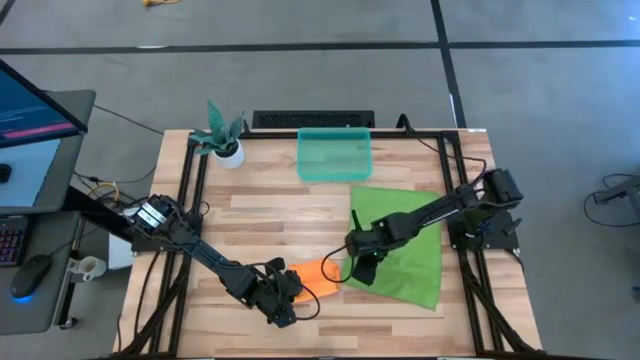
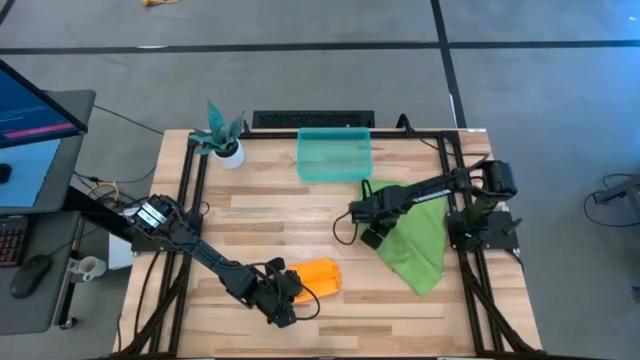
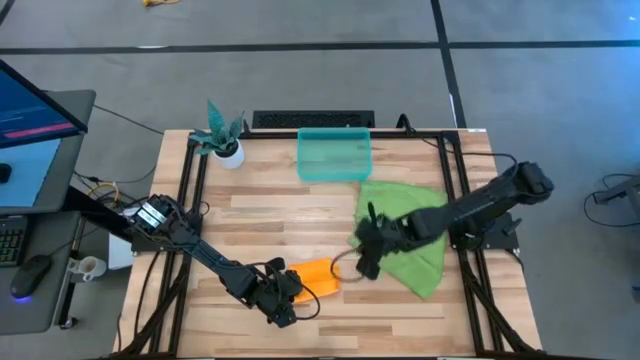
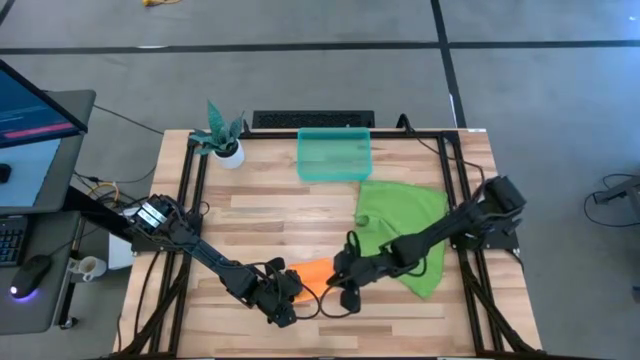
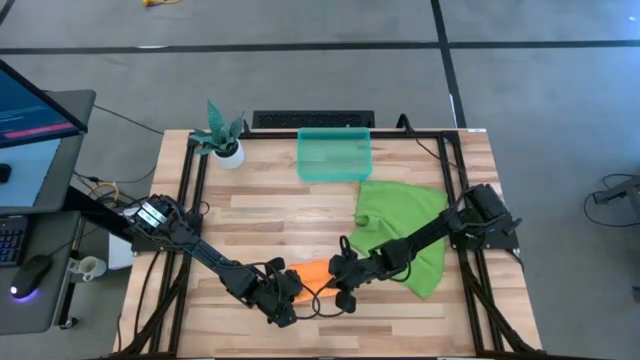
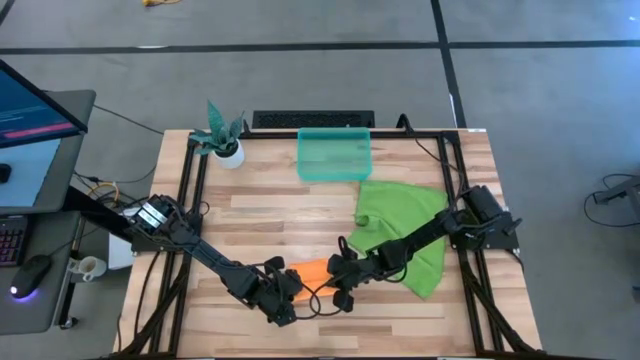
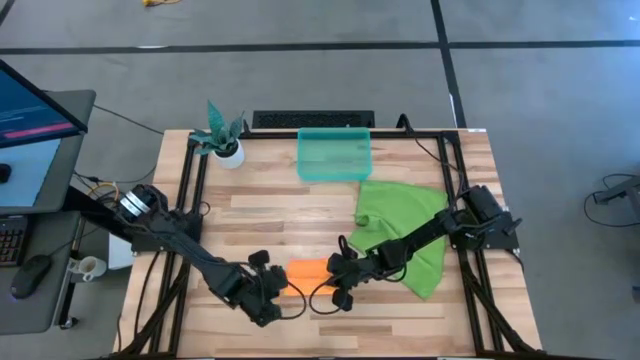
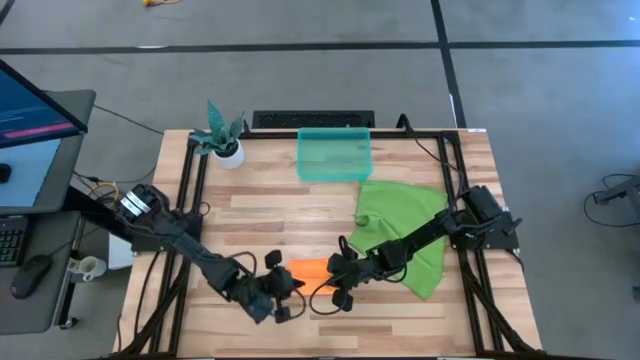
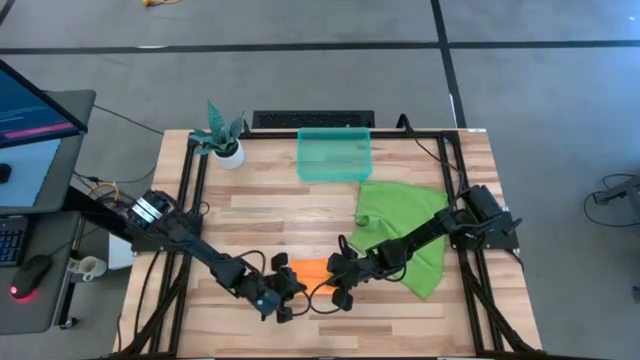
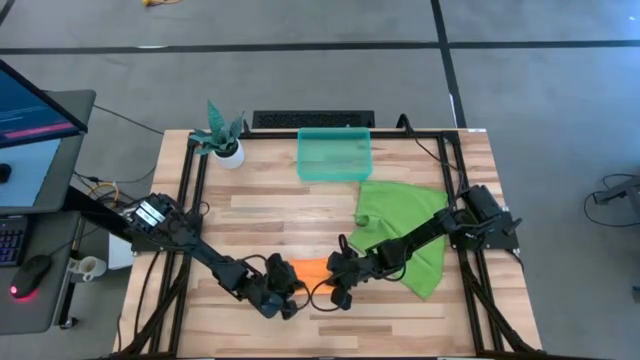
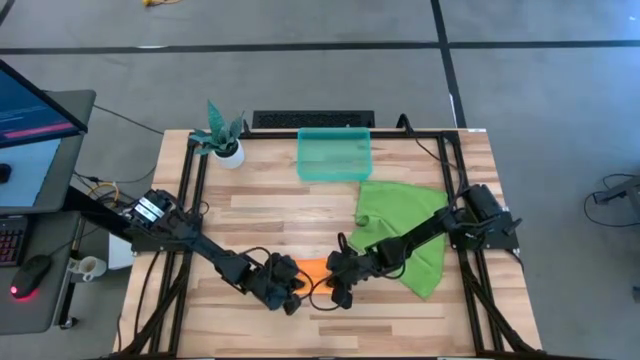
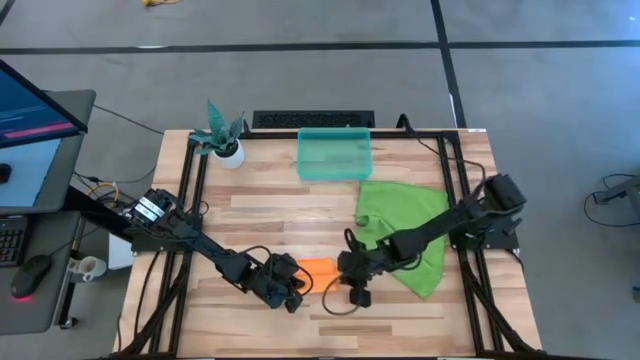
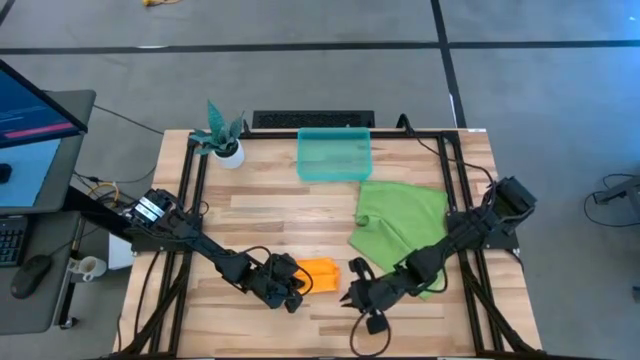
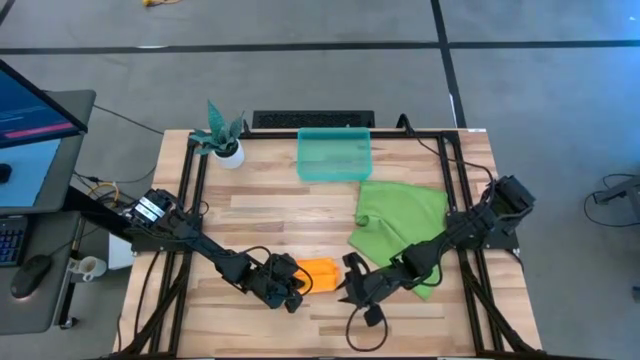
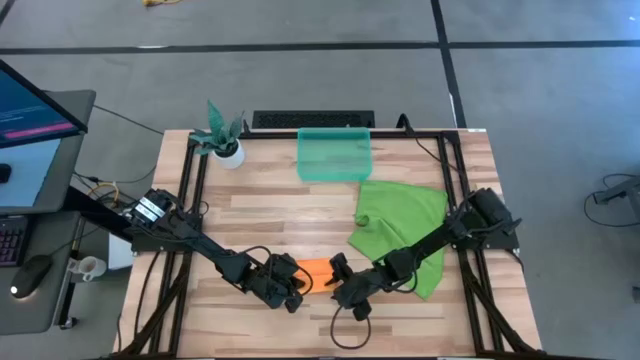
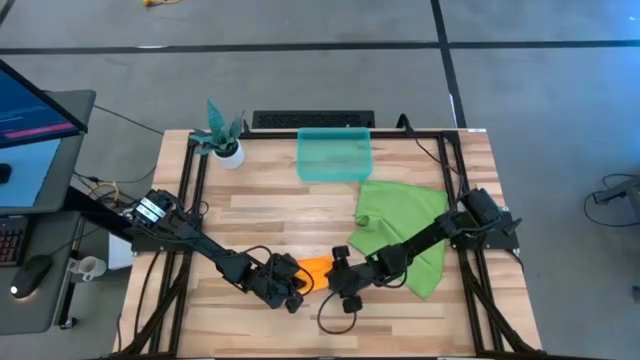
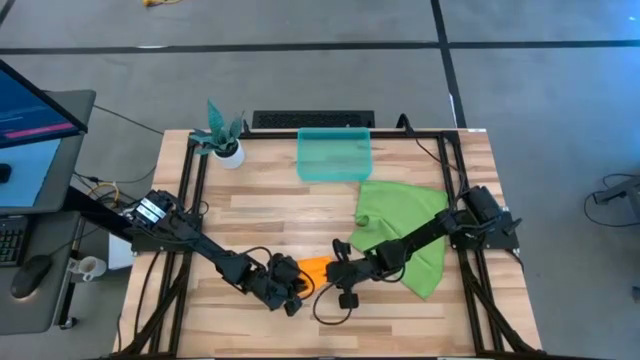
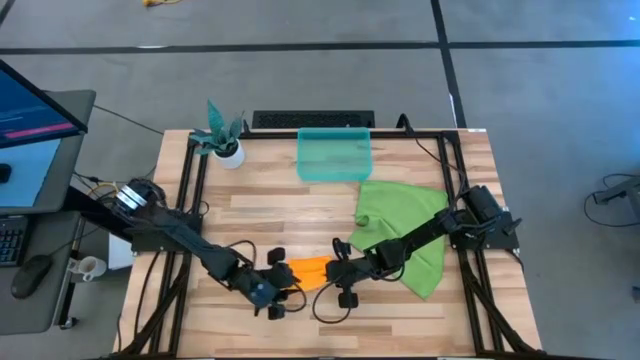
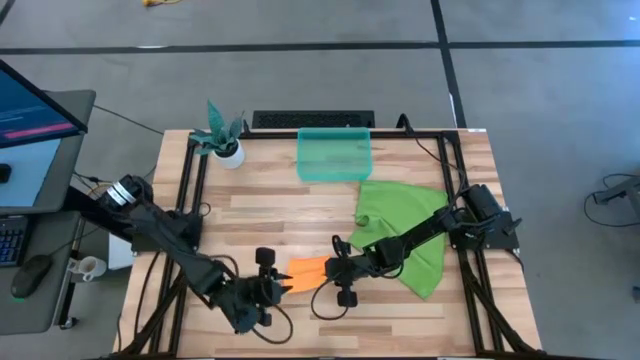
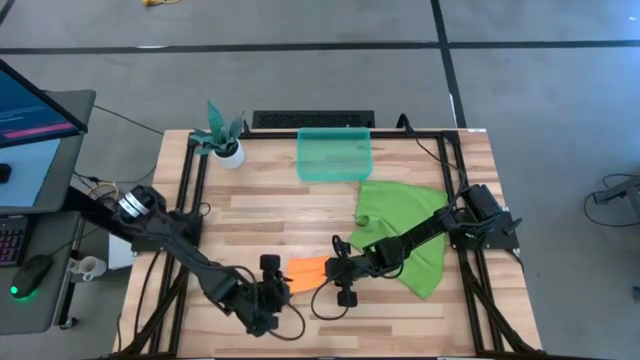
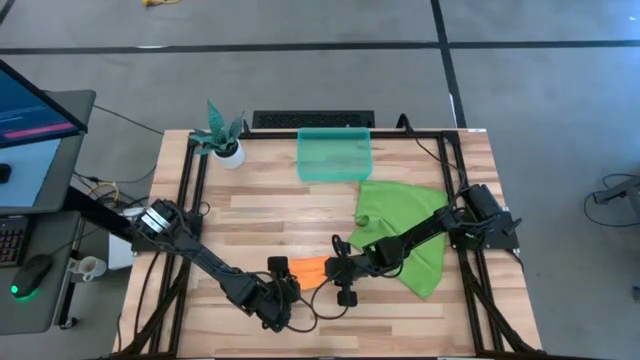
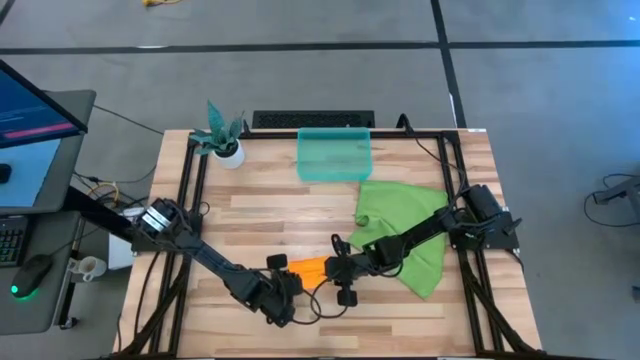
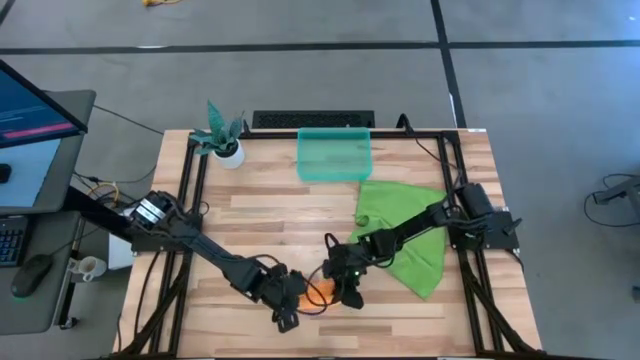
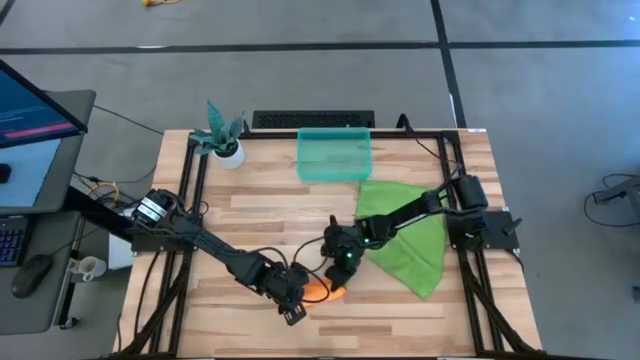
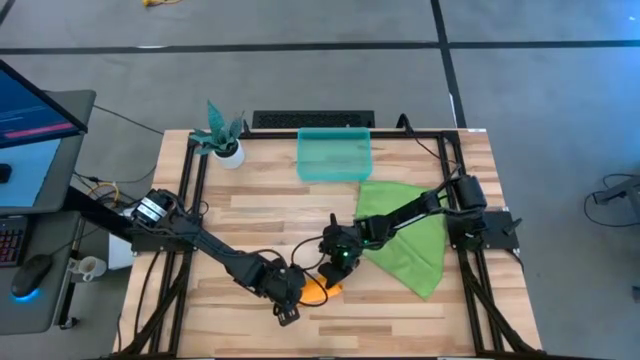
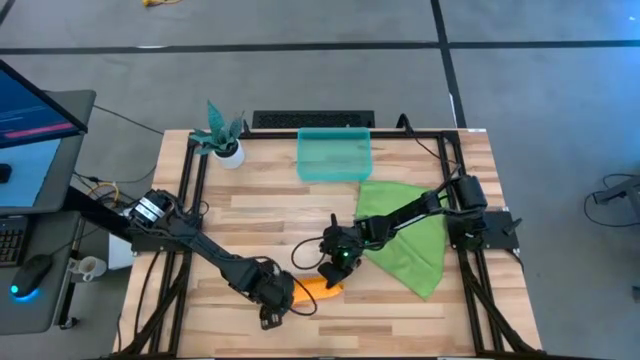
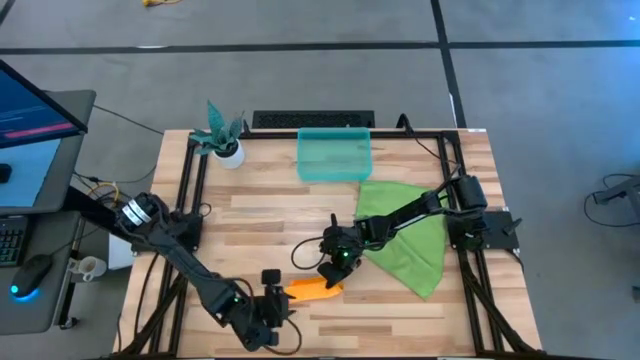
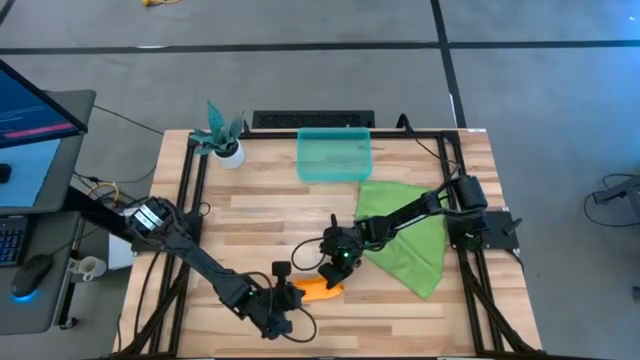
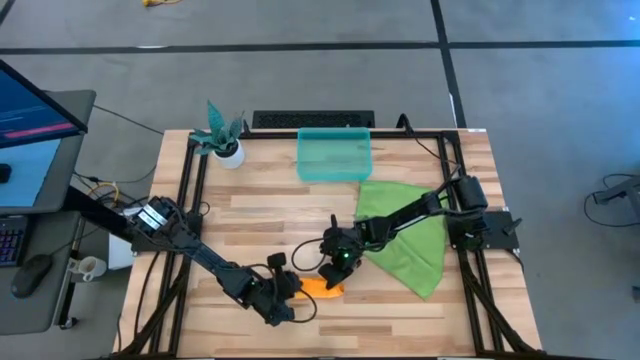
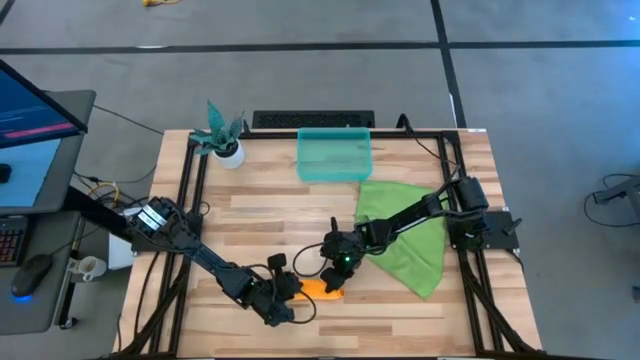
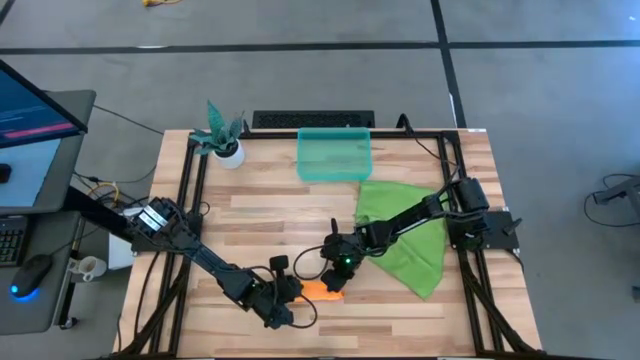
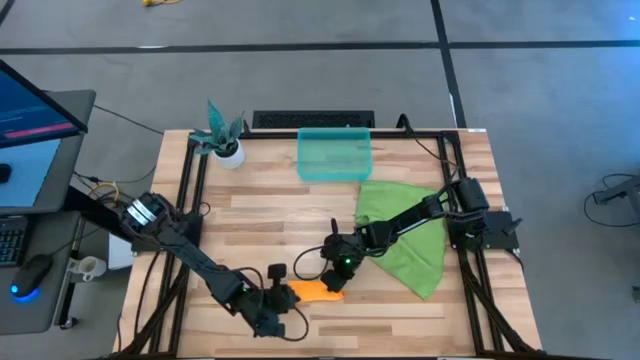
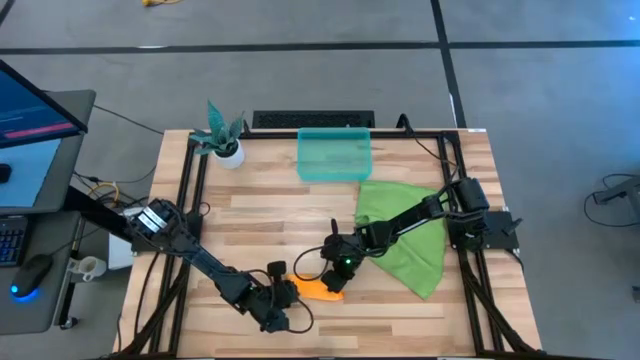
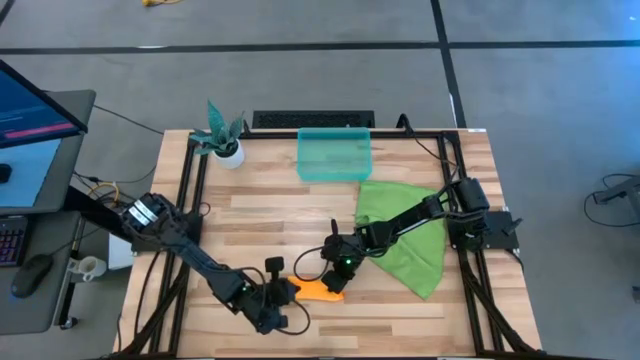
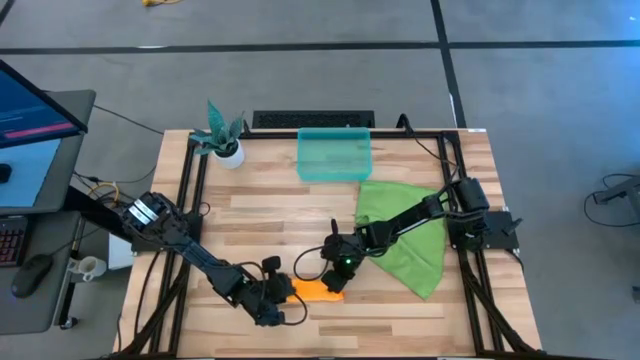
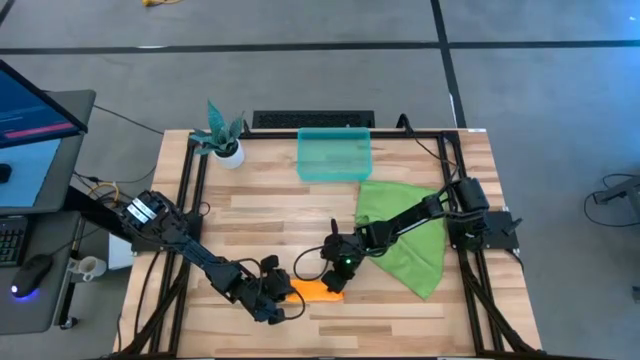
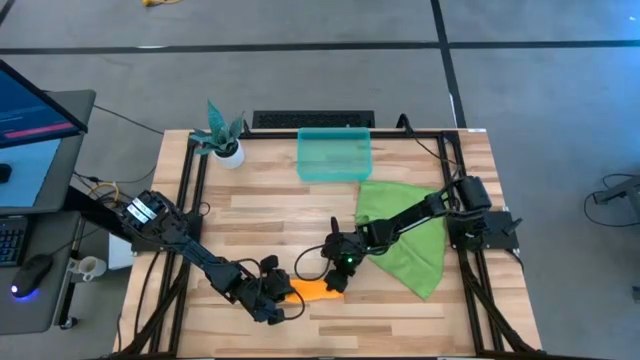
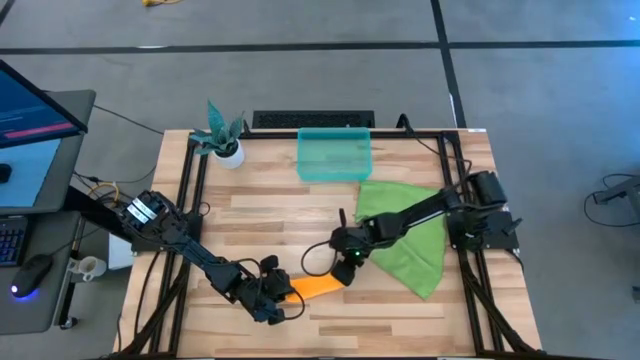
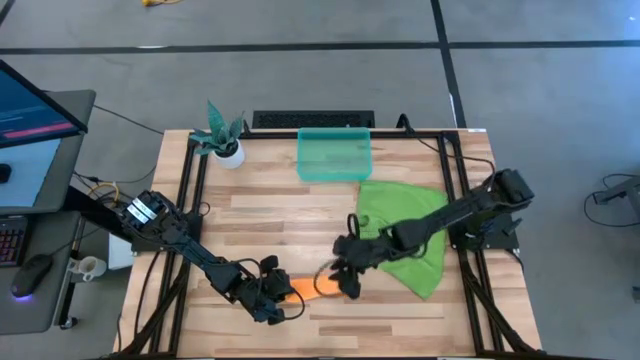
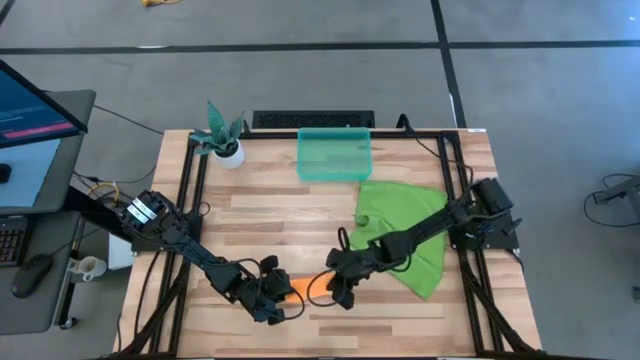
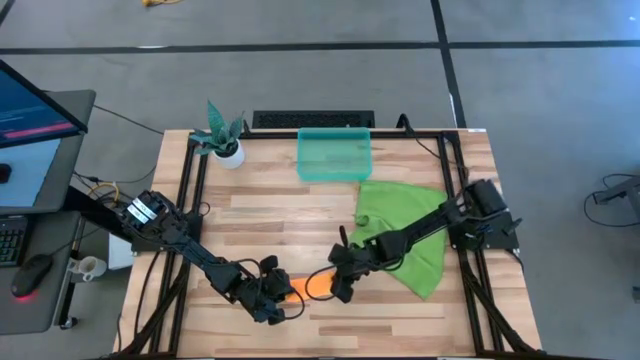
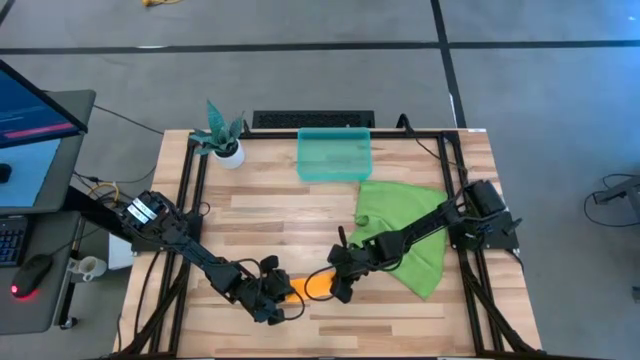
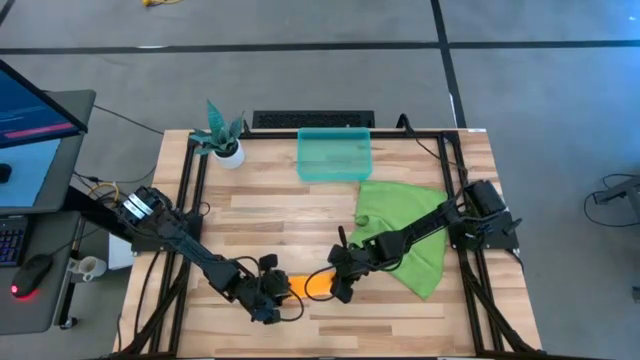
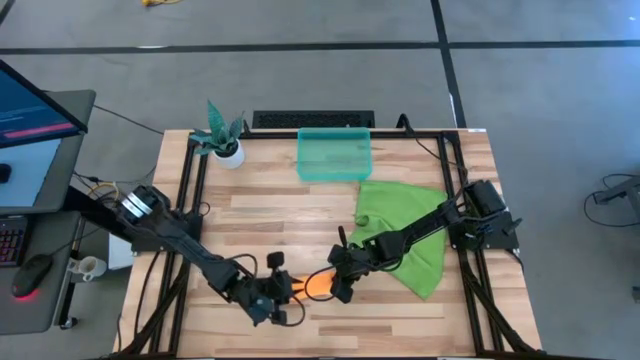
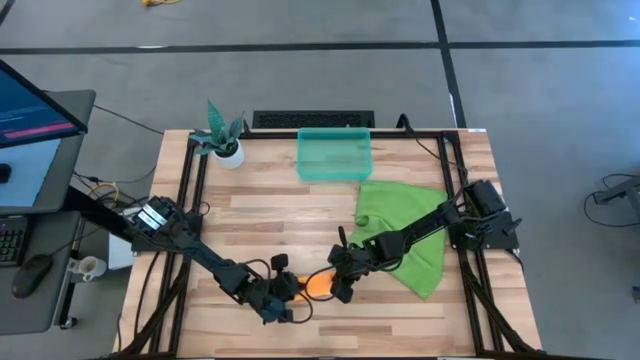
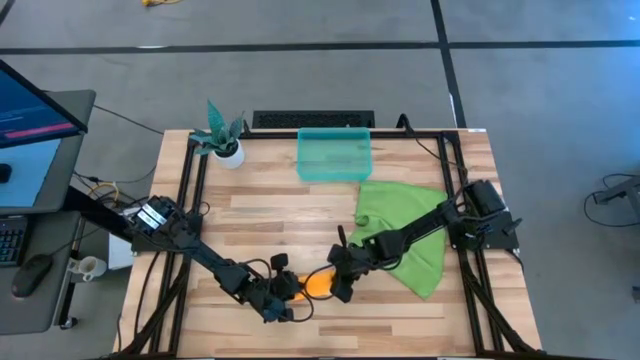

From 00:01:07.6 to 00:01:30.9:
Task: Roll microfiber towels into tight, uniform cylinder then place into a basket
Roll the orange towel
